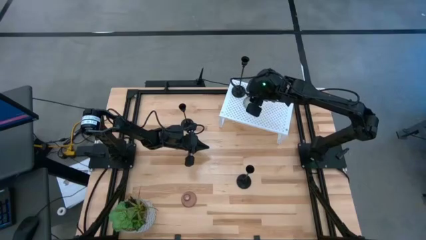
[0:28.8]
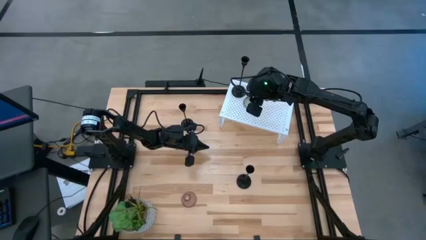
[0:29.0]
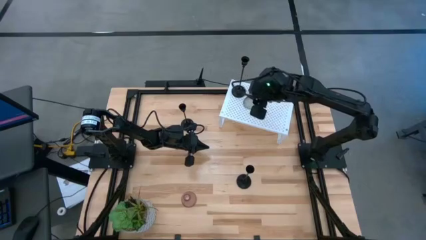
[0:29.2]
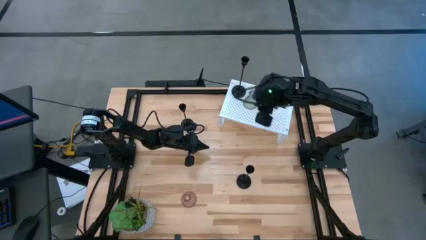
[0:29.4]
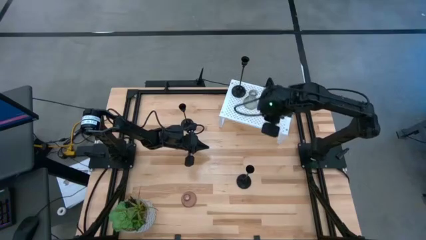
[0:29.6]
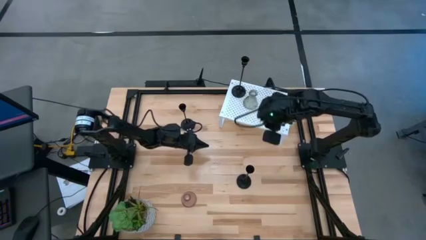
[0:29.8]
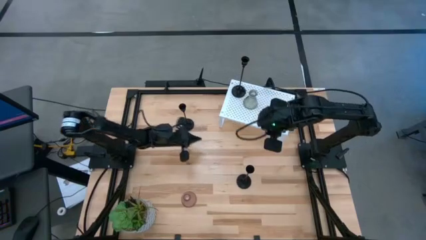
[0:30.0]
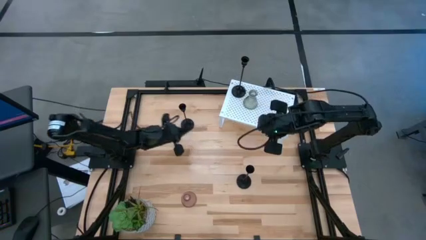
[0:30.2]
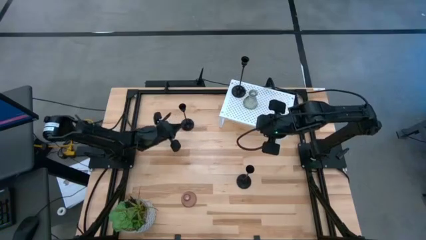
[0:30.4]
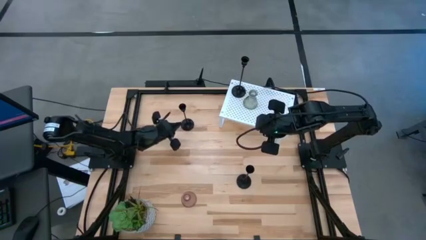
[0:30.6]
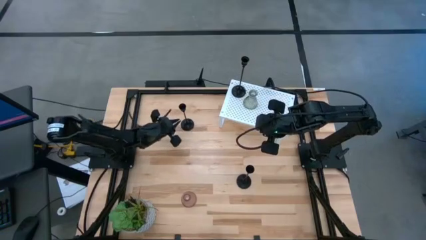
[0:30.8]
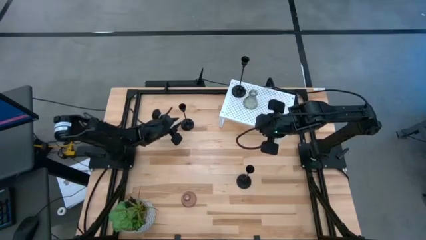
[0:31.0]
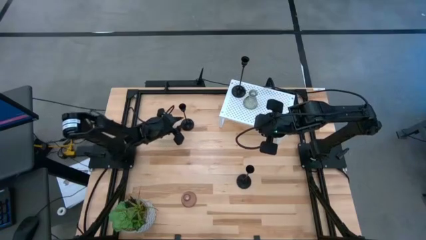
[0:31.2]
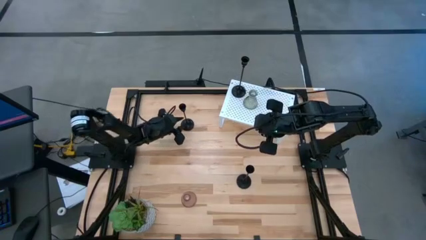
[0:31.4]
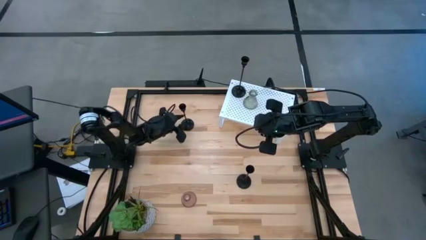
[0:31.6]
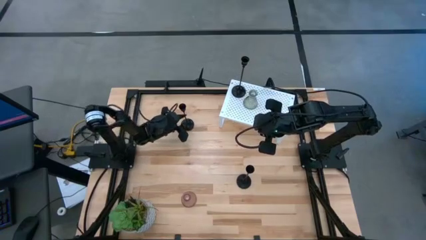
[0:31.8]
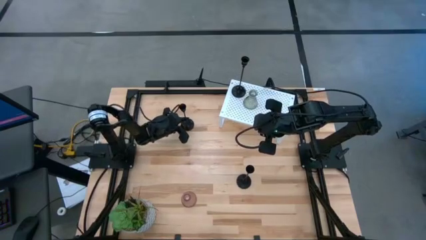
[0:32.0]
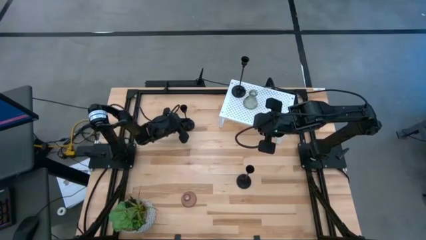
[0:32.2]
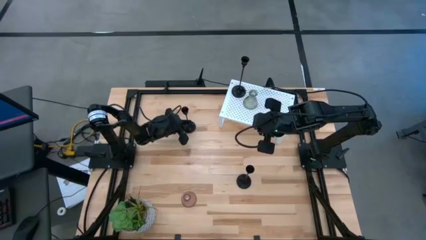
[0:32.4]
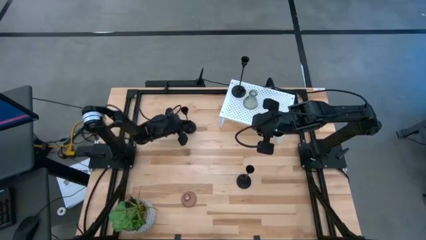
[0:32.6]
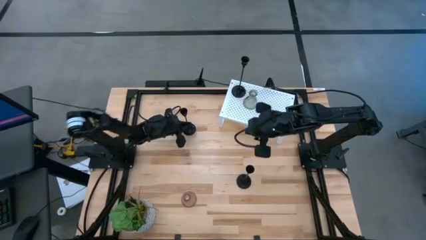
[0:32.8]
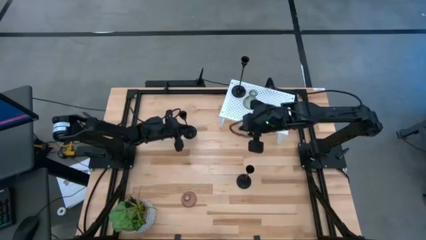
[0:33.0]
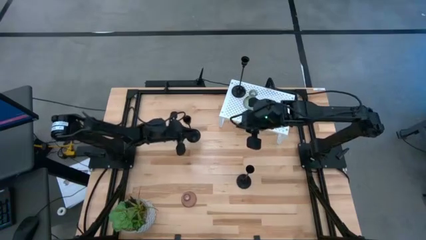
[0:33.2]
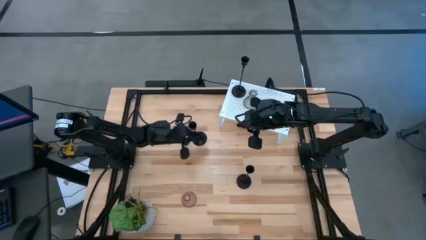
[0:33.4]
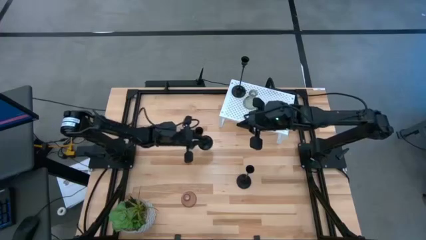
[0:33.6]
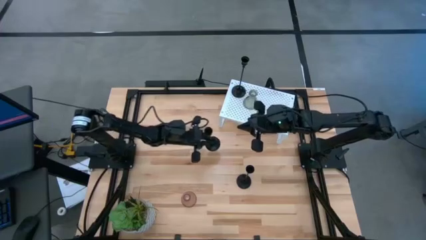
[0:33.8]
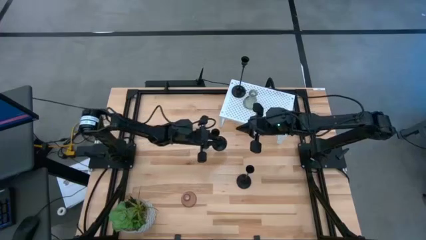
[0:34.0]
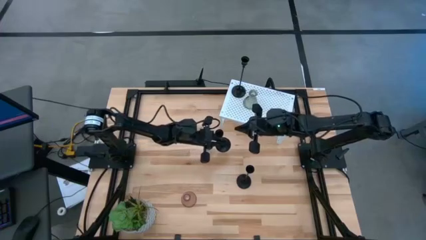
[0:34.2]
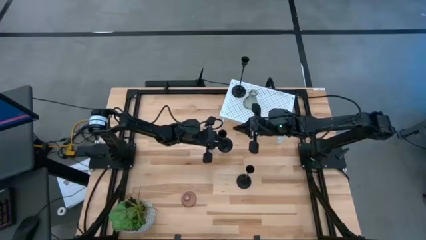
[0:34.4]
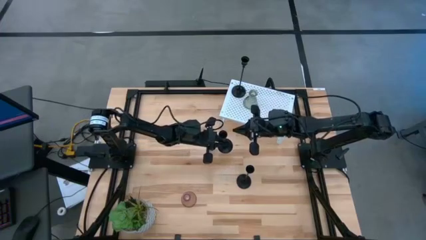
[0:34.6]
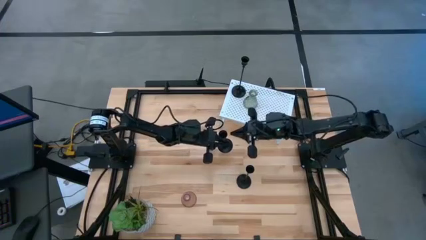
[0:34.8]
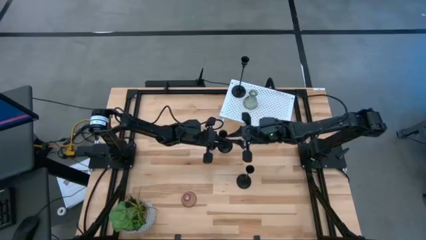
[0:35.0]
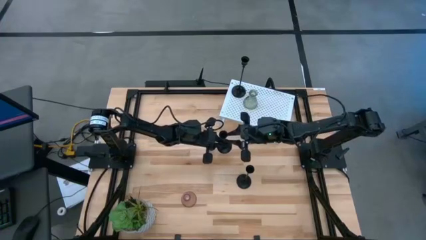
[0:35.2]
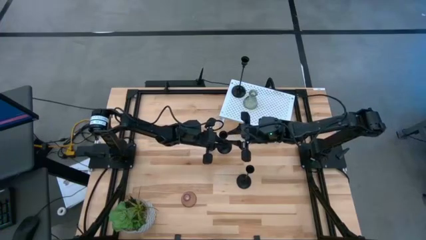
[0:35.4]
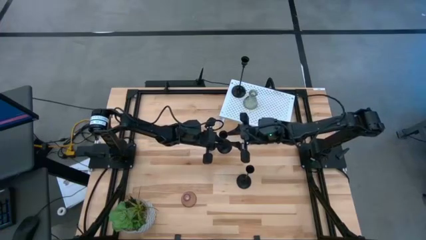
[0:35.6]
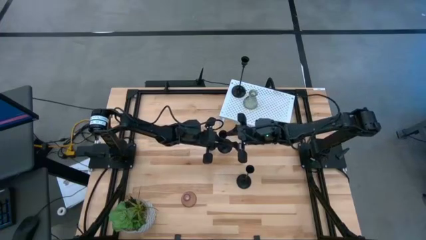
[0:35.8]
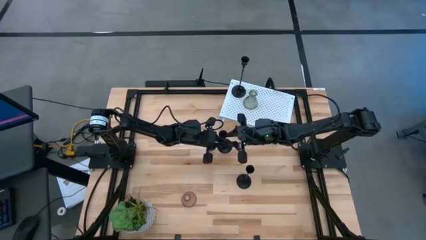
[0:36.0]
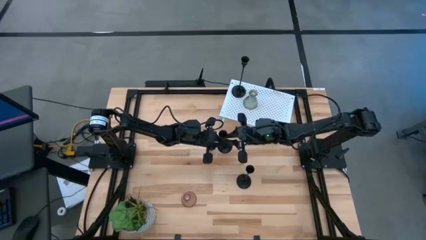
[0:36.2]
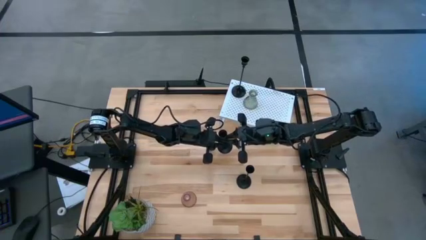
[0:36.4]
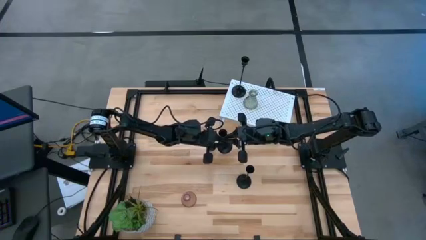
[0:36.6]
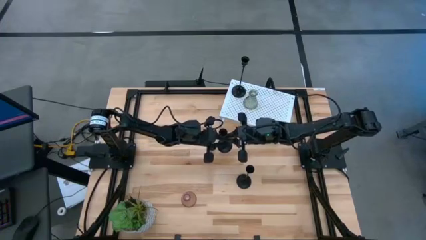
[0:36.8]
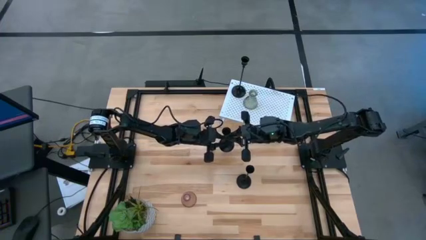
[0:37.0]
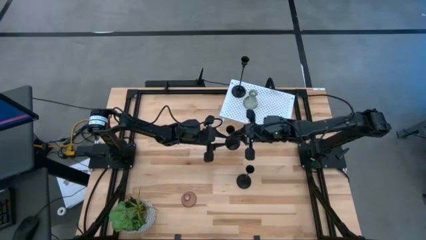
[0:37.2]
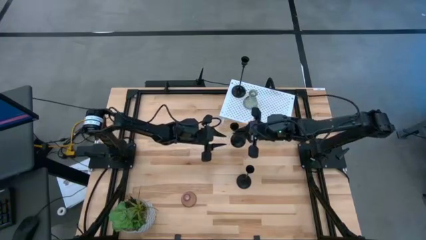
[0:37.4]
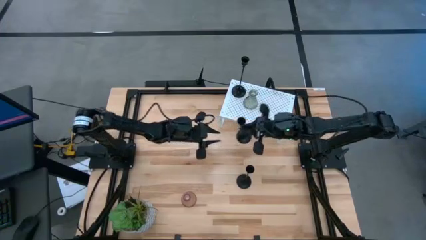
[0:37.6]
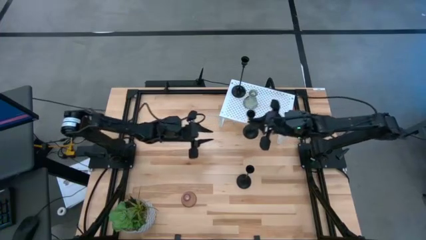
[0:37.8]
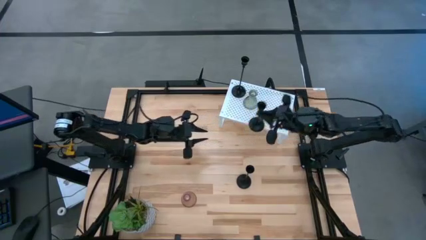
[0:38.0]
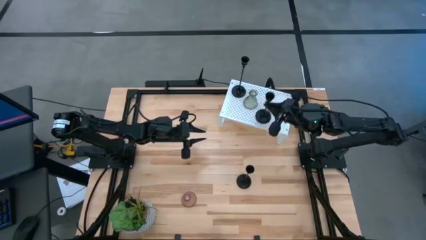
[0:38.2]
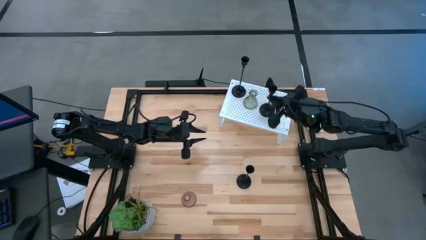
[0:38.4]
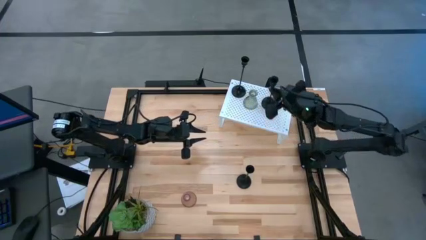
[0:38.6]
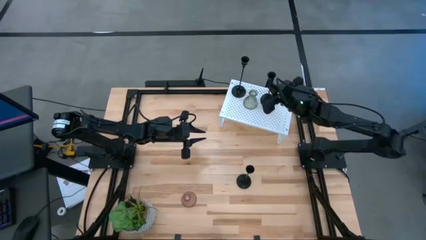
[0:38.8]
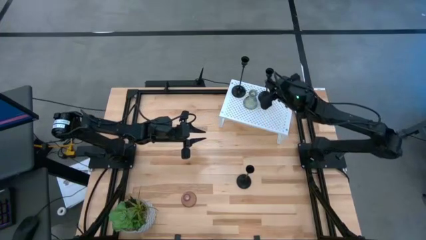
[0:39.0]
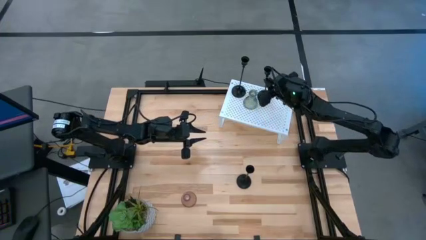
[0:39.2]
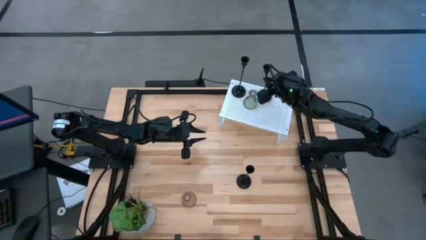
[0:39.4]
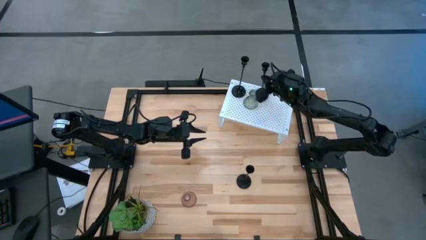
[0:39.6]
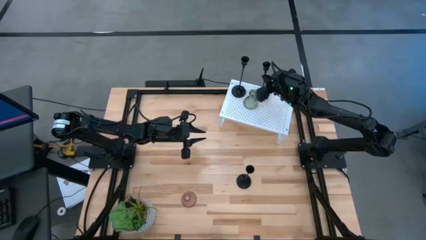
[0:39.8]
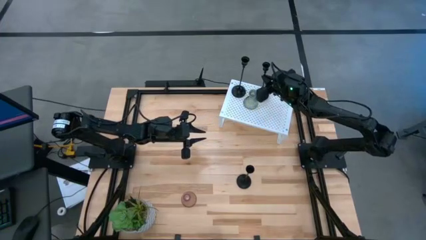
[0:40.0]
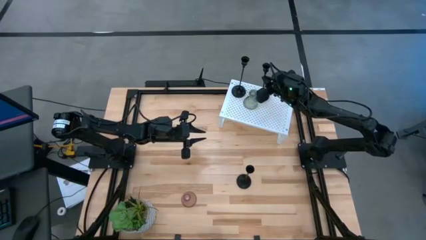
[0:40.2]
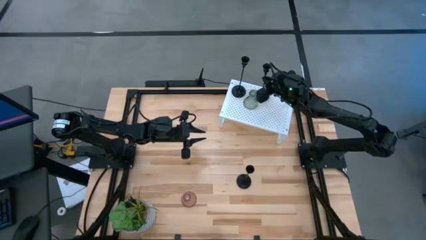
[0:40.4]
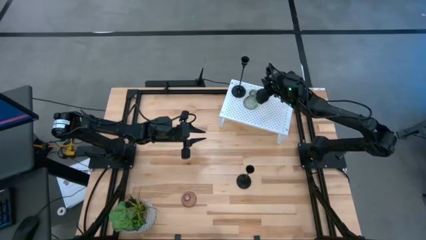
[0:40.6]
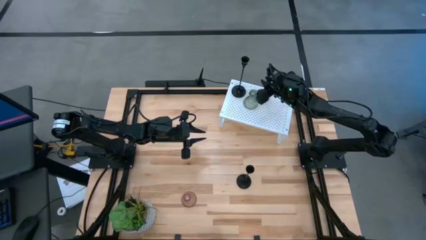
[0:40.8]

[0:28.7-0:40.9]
Task: Pick & Place candle stick holders
Put the top black candle holder on the shelf

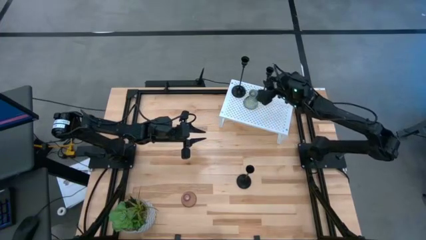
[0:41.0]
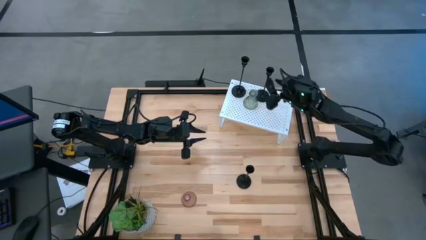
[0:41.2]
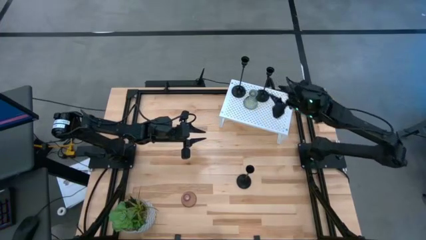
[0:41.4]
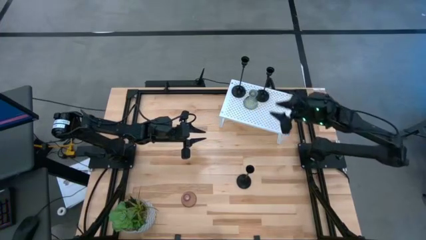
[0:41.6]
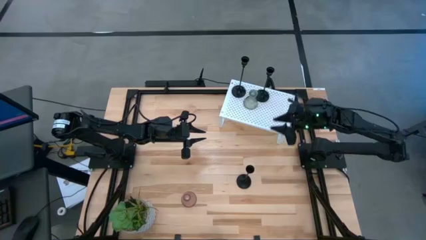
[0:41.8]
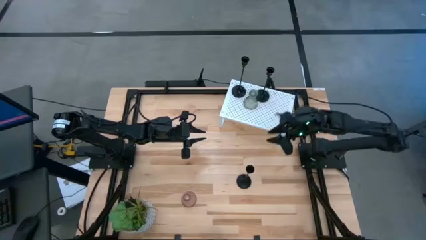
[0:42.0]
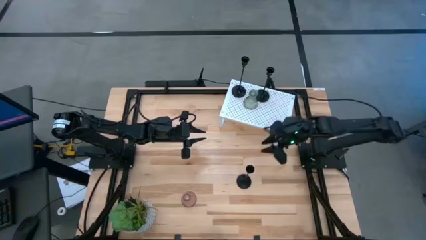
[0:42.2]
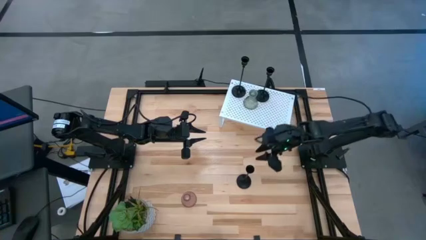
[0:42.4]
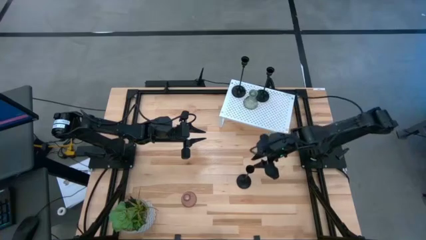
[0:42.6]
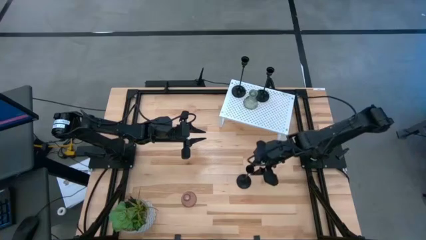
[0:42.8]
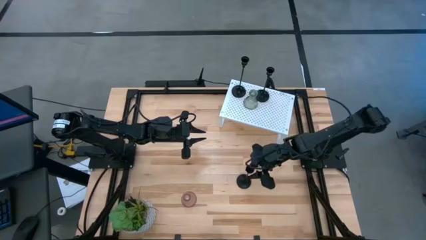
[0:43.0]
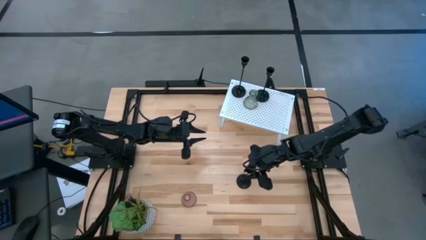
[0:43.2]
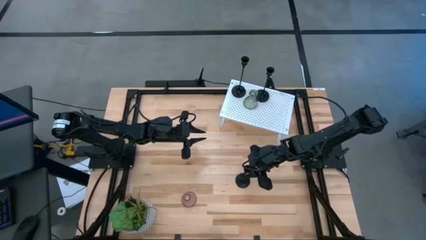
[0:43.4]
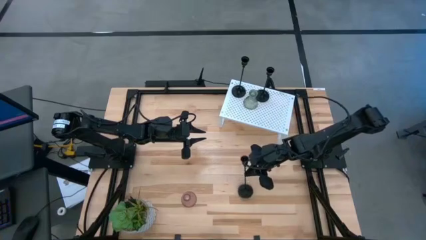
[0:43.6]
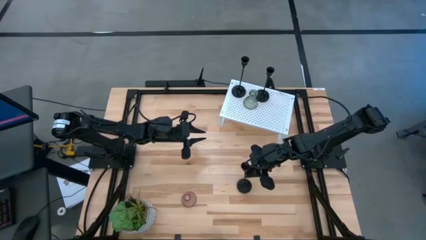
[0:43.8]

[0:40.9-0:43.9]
Put the black candle holder on the shelf
